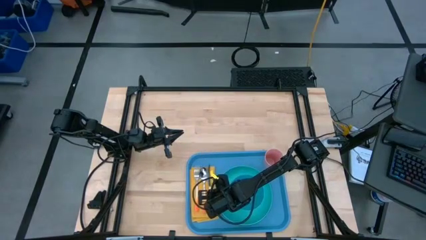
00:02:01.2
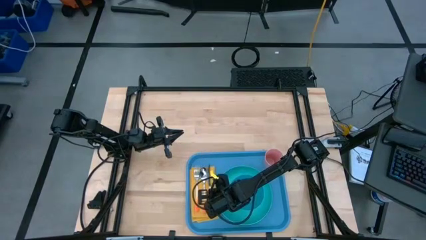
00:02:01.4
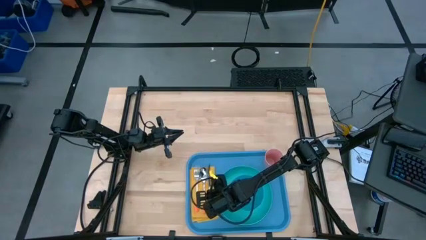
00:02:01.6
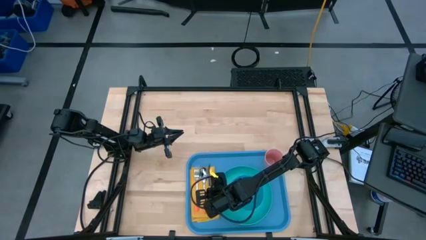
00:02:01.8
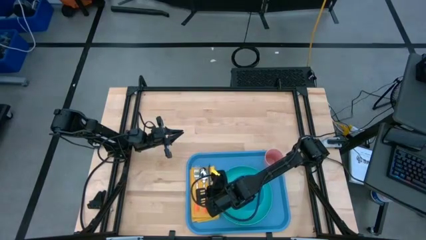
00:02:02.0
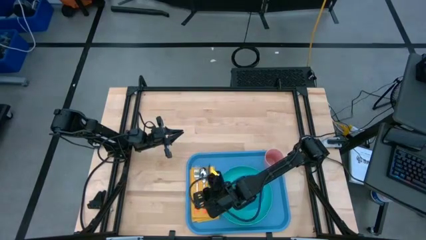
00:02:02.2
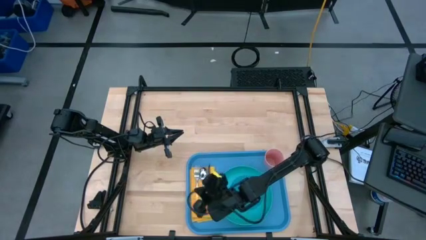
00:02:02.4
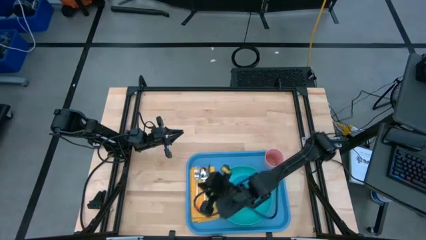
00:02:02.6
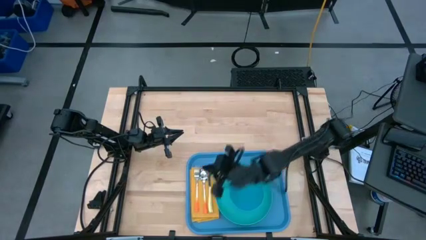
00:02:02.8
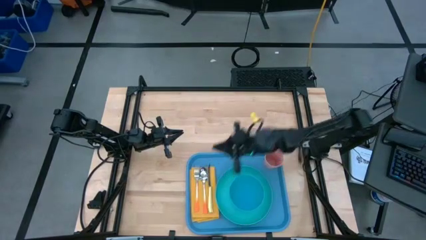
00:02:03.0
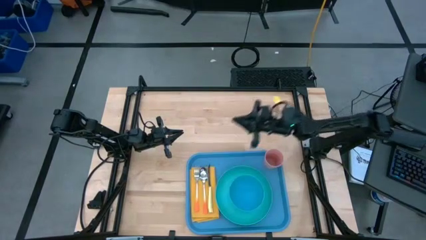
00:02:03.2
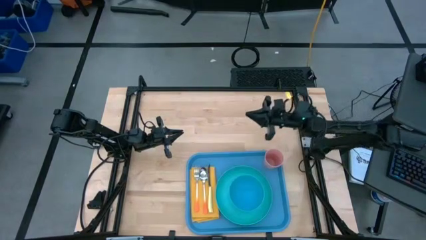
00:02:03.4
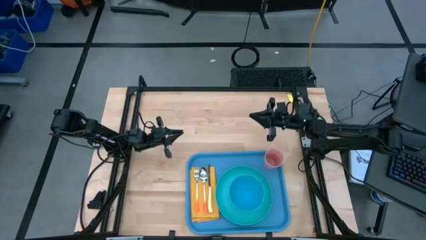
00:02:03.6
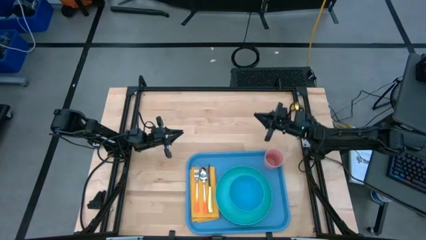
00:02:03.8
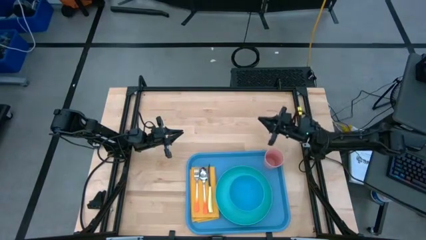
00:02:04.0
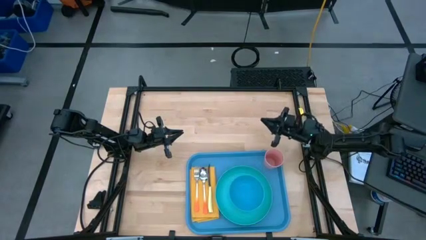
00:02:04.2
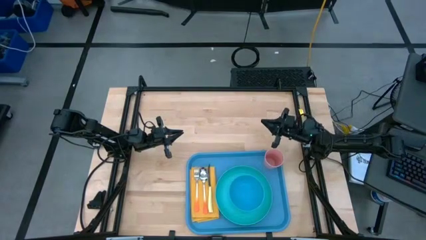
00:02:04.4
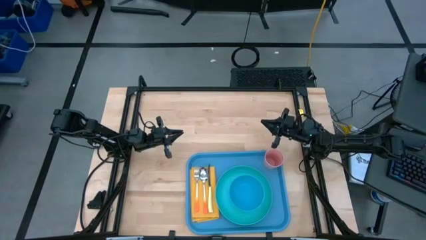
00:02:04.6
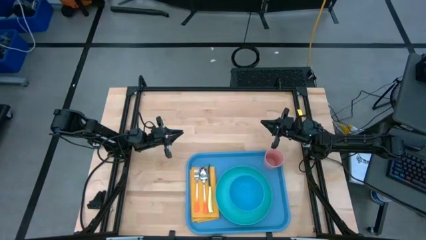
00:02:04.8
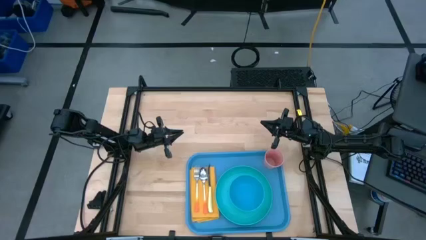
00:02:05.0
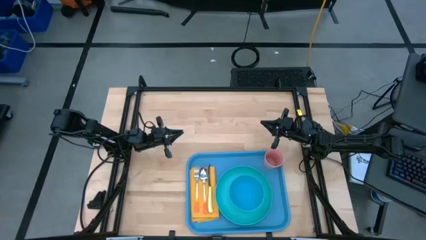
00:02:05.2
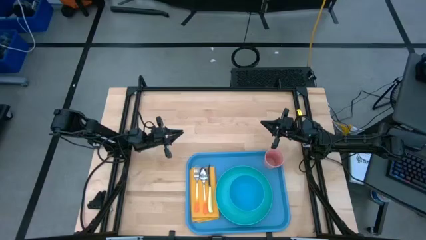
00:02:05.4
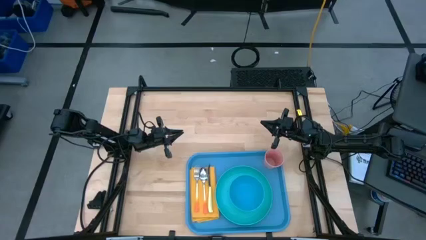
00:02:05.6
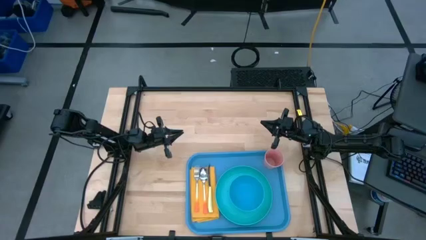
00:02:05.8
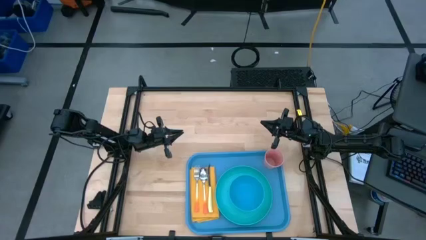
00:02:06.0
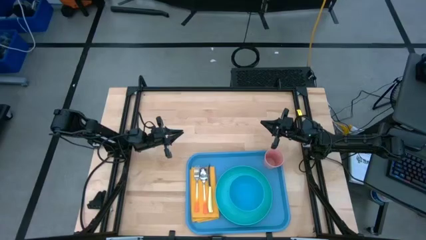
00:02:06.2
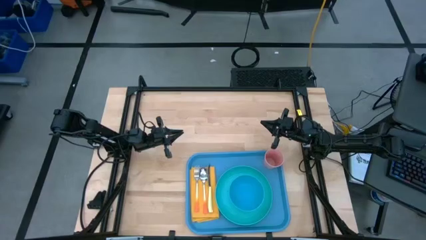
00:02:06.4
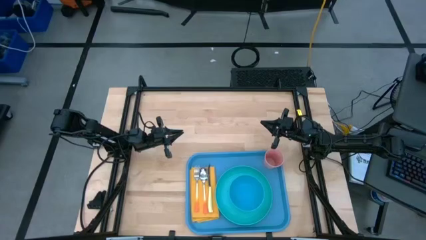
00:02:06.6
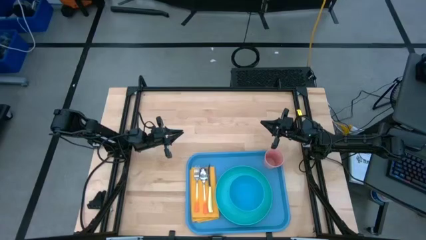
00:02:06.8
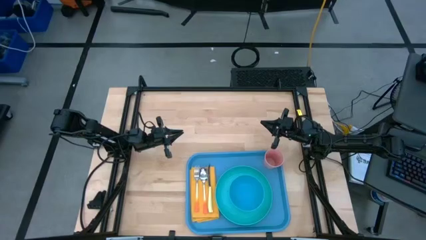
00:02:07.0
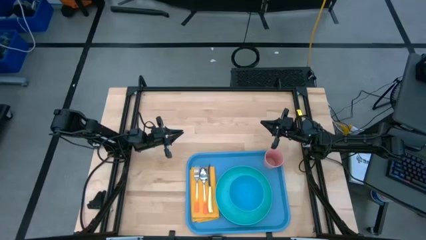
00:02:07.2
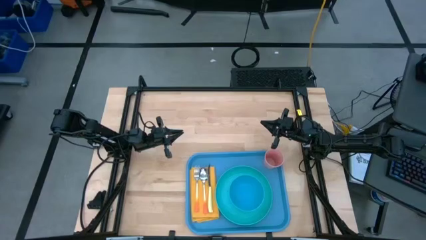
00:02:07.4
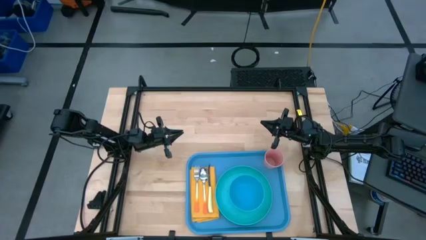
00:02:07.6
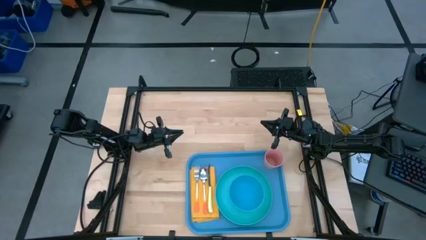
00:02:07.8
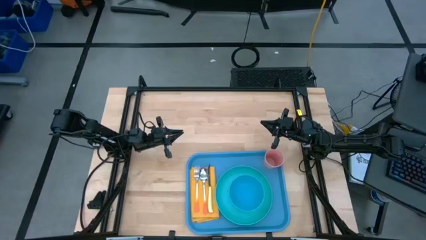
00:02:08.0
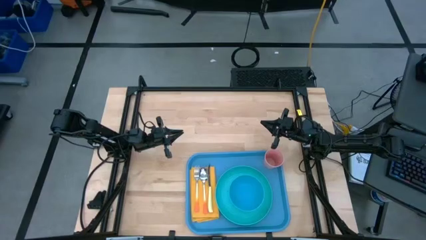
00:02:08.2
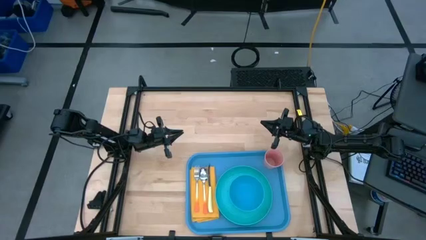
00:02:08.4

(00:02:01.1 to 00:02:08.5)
Task: Set up tray
Return to Home Position

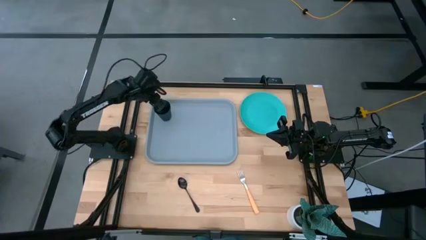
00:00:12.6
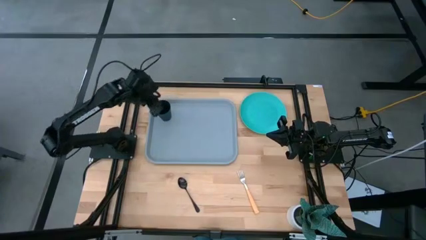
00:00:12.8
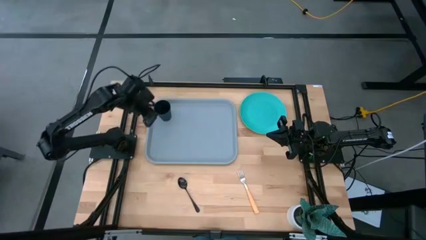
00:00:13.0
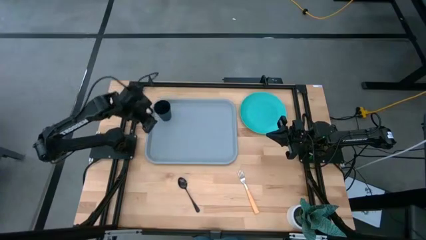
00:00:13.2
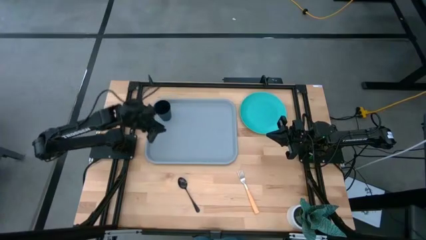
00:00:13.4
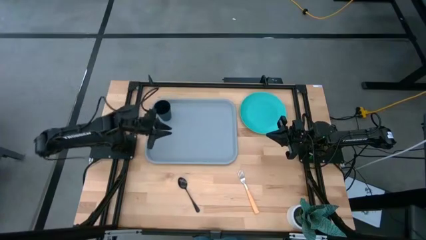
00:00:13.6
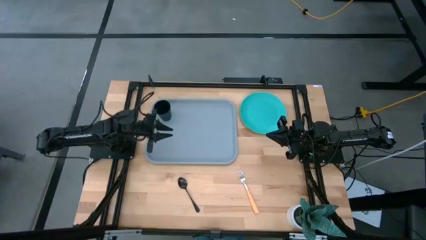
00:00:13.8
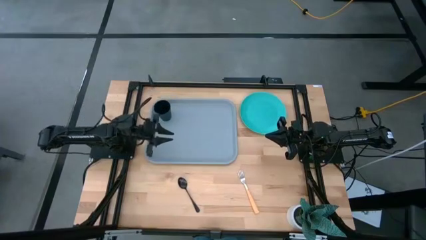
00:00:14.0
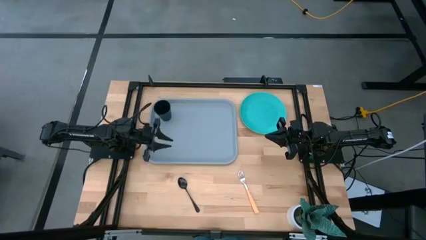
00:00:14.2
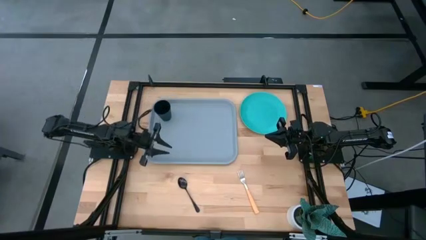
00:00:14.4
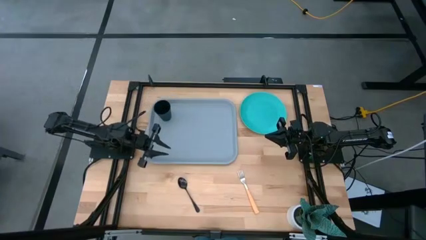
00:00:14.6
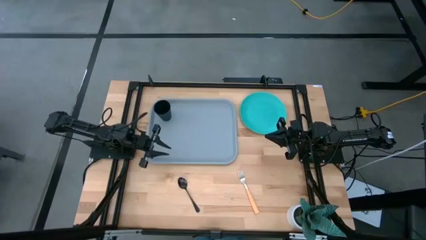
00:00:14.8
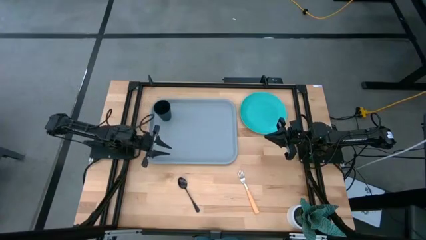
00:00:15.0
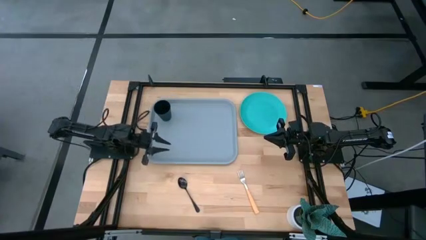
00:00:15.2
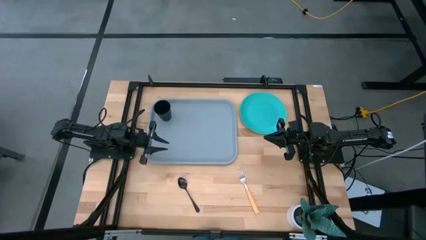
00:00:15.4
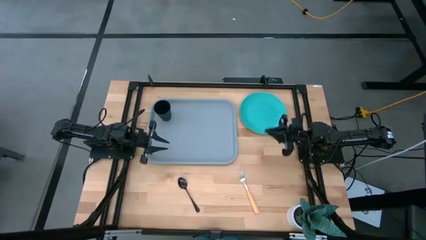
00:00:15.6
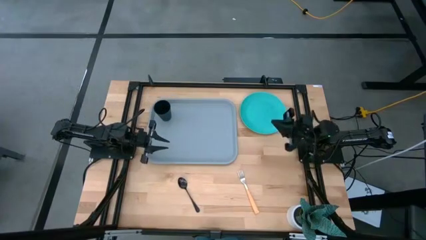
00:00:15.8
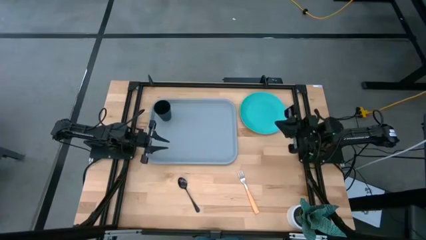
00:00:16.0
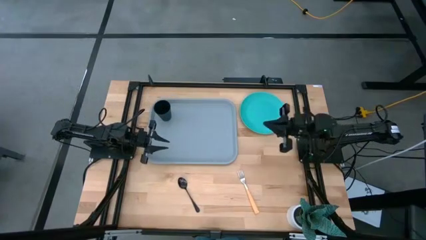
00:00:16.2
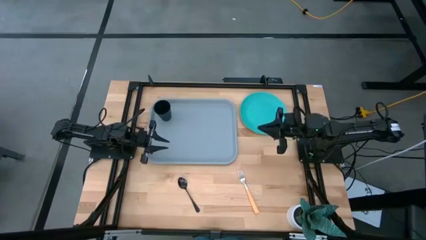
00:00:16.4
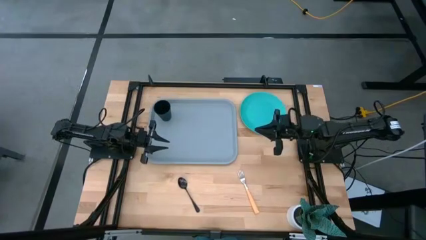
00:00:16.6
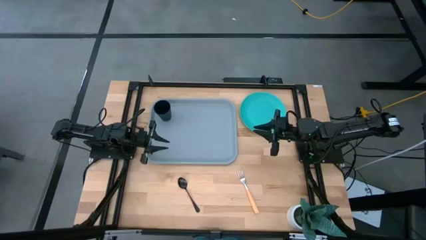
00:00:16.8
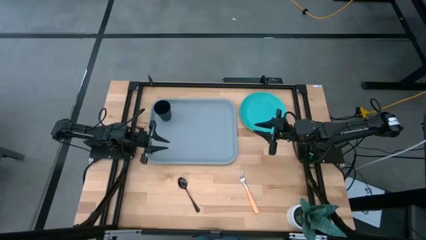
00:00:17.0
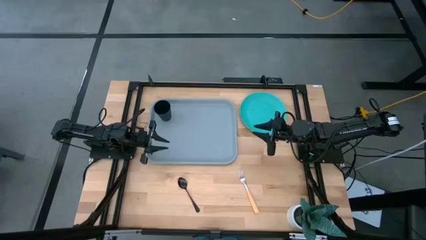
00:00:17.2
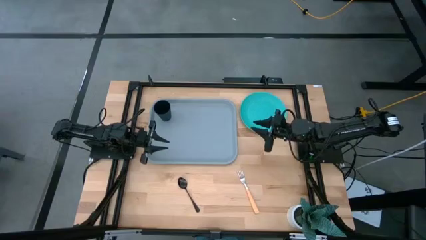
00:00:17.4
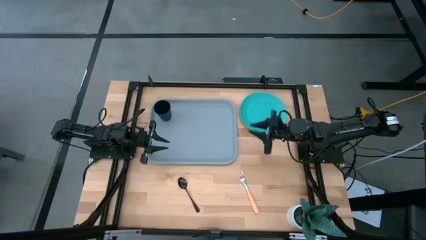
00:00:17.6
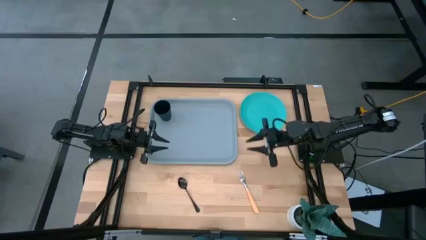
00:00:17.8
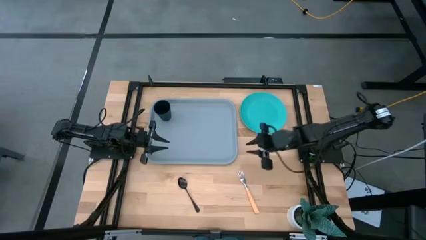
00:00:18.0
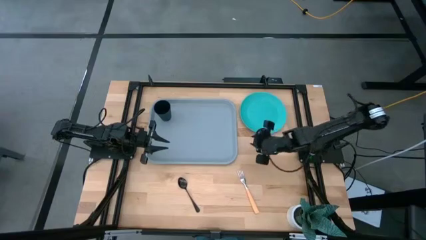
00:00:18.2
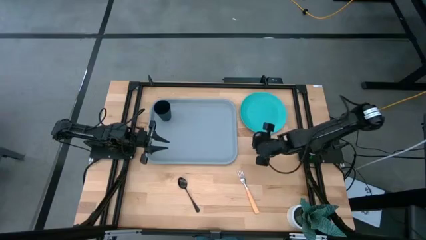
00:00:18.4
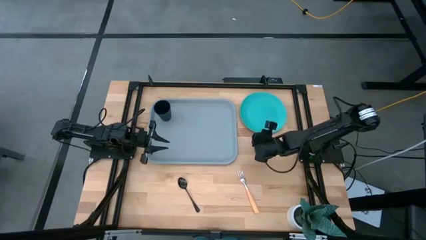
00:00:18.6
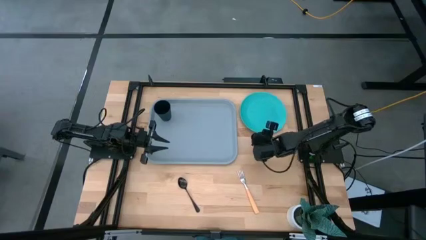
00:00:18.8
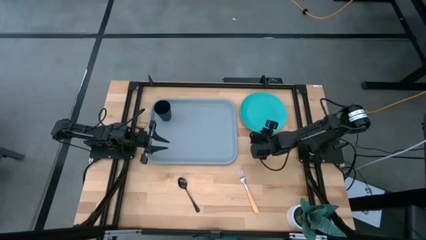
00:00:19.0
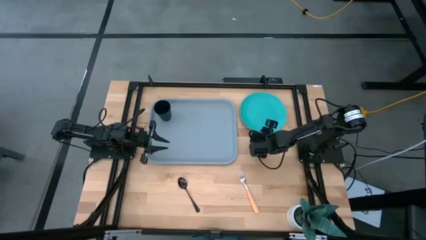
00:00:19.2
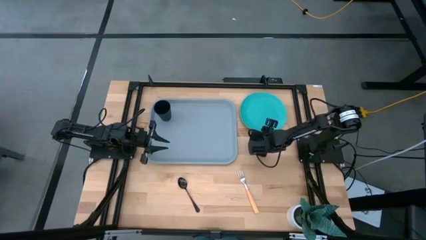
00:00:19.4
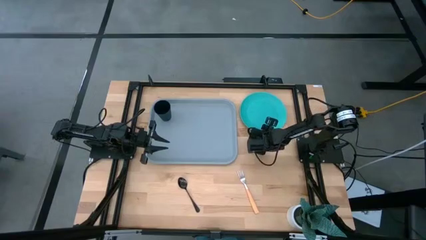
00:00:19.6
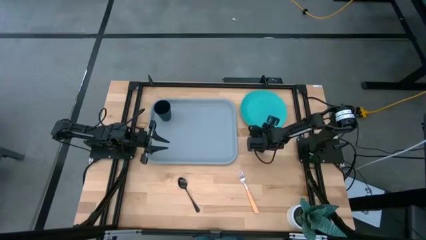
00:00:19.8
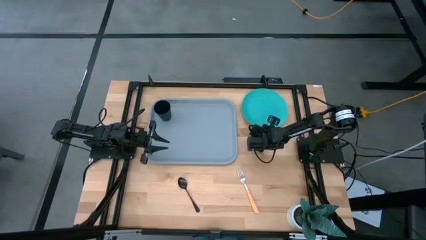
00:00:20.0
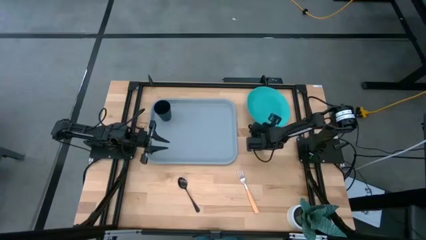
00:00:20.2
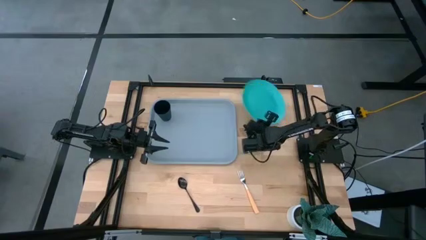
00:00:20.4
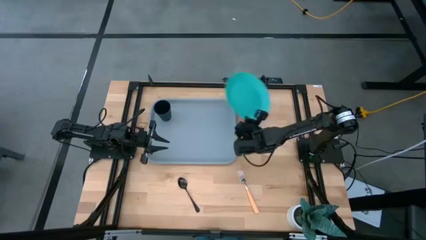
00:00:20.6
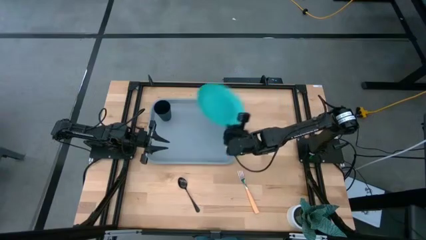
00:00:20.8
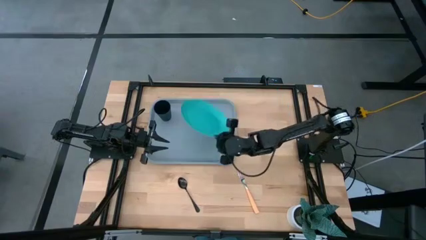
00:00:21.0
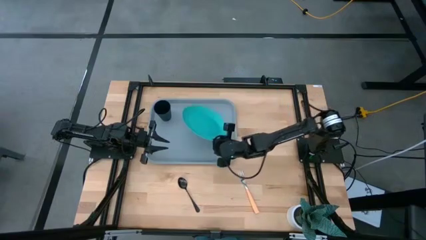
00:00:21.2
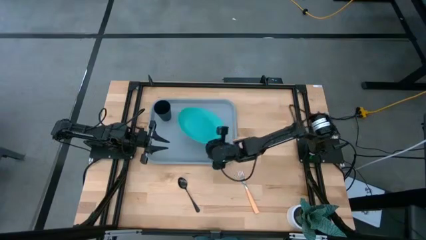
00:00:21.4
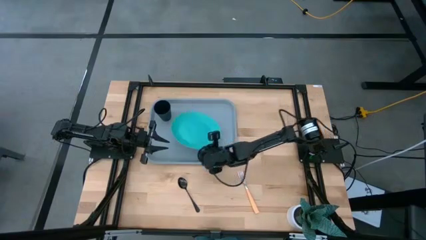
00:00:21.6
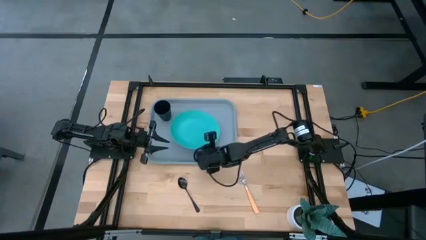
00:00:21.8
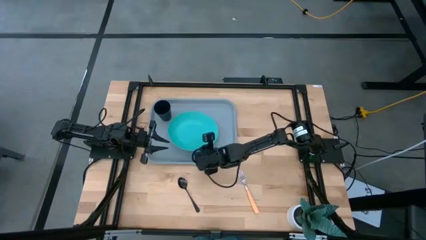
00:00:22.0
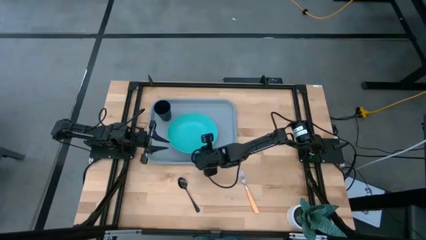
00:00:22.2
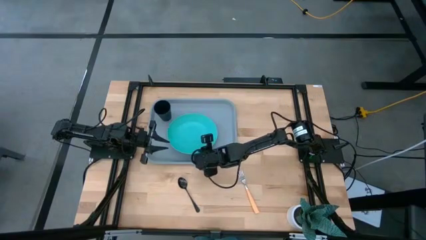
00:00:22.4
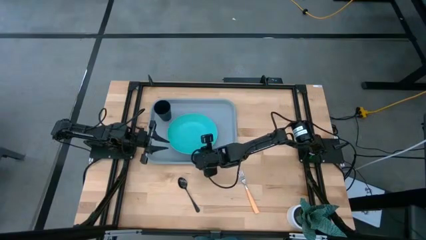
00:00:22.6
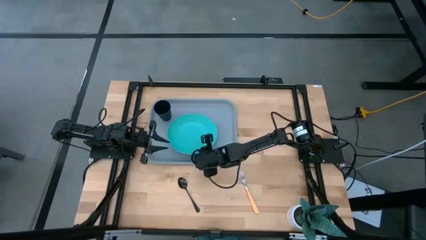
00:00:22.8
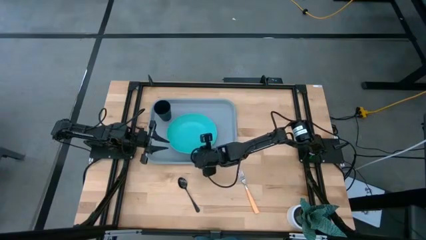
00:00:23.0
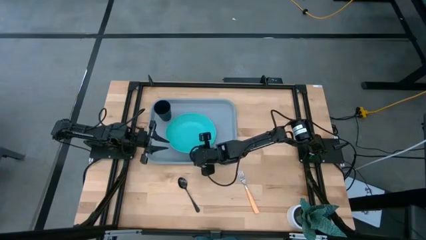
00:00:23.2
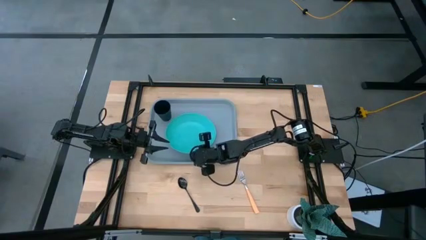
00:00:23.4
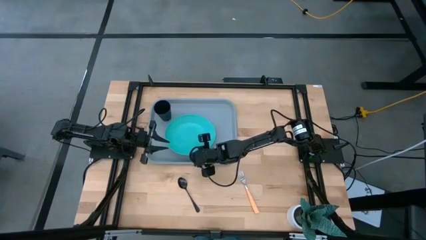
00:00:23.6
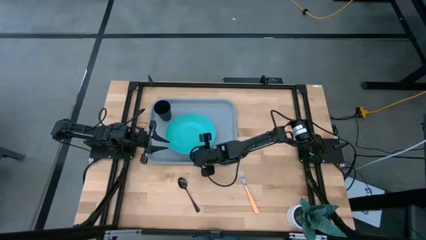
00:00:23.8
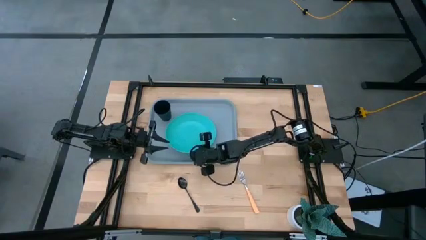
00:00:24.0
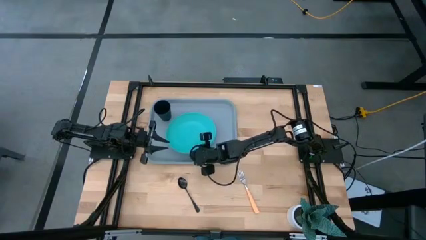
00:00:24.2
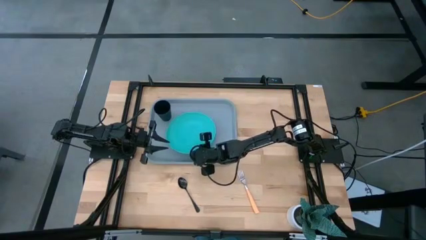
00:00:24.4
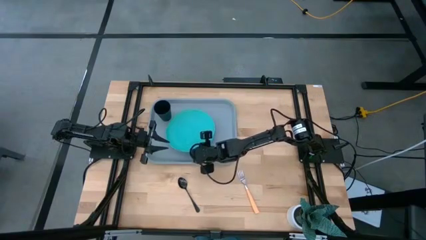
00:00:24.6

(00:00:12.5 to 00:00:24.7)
Task: Pick and place plate/cup/fork/spoon on tray
Put the light blue plate on the gray table tray to the bottom right of the black cup
